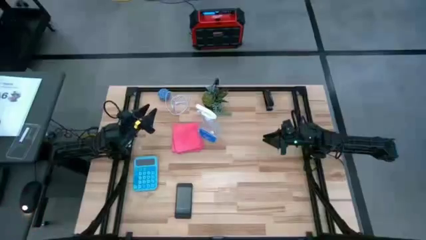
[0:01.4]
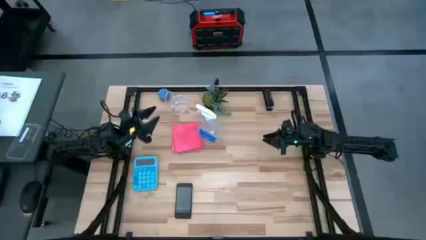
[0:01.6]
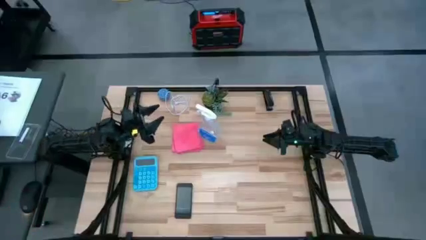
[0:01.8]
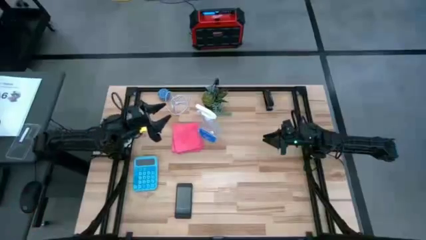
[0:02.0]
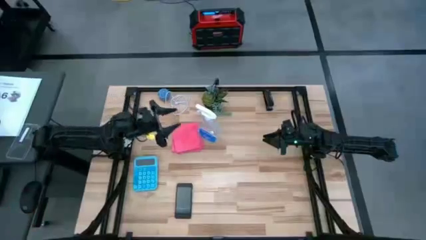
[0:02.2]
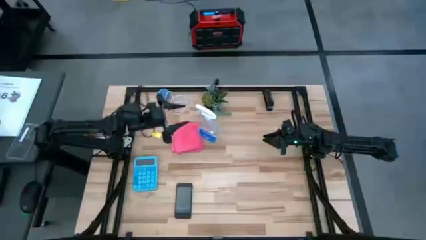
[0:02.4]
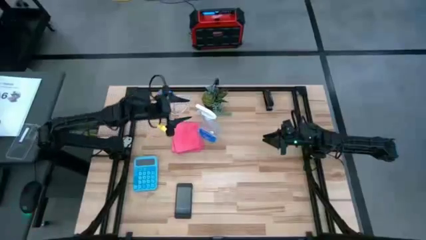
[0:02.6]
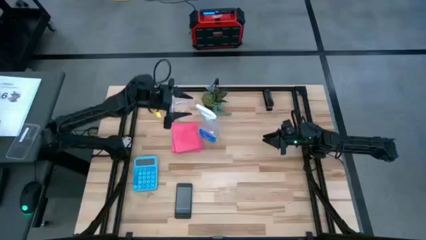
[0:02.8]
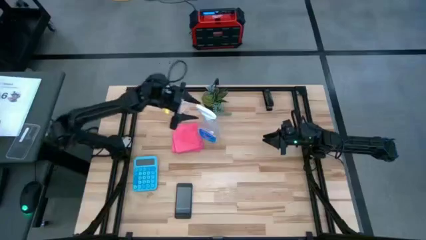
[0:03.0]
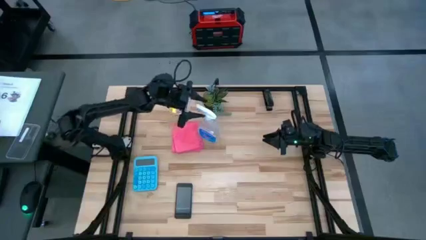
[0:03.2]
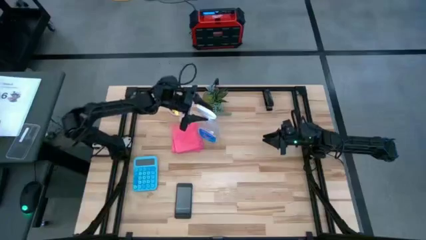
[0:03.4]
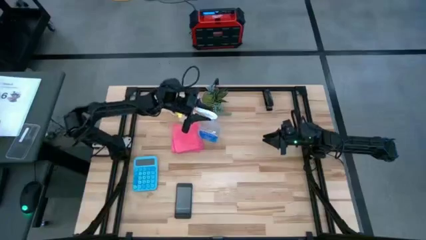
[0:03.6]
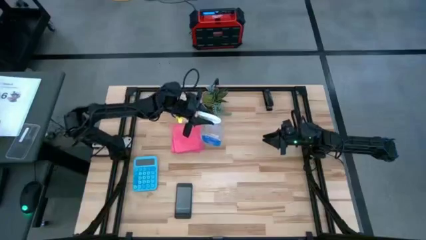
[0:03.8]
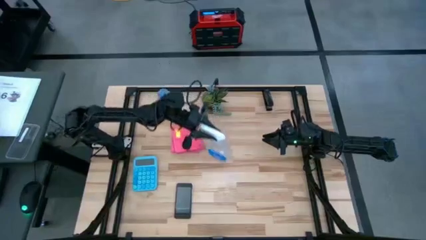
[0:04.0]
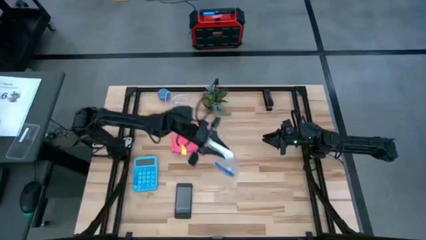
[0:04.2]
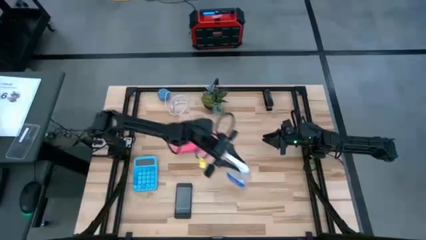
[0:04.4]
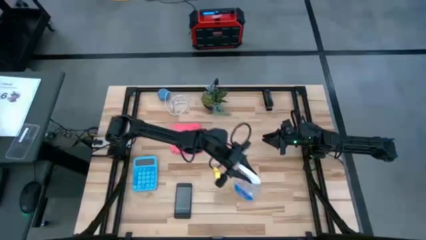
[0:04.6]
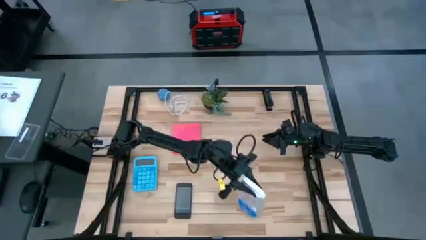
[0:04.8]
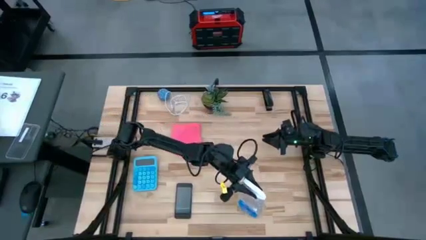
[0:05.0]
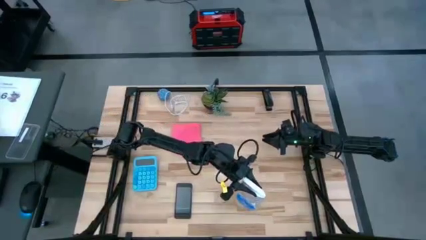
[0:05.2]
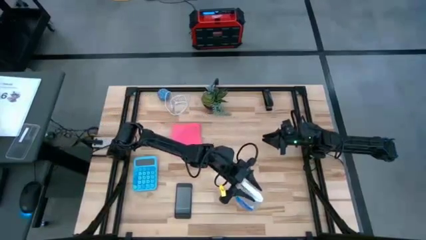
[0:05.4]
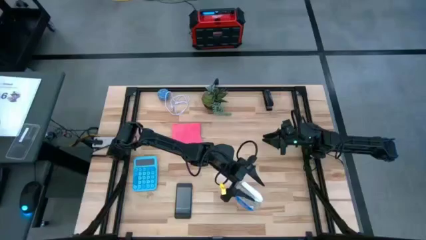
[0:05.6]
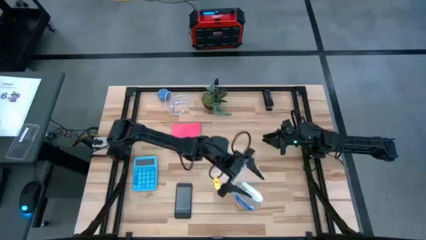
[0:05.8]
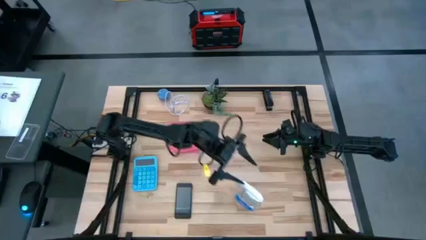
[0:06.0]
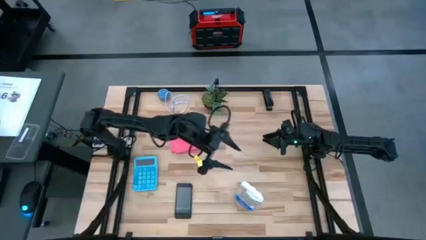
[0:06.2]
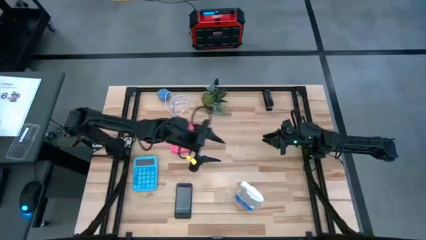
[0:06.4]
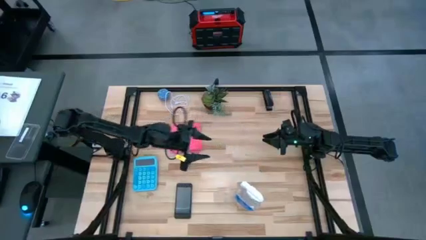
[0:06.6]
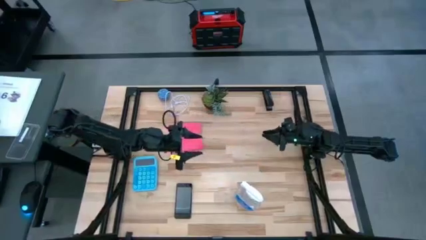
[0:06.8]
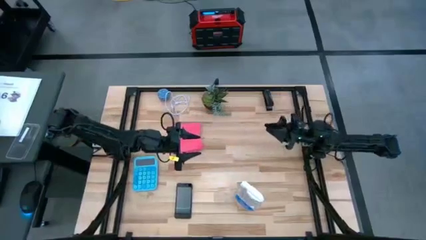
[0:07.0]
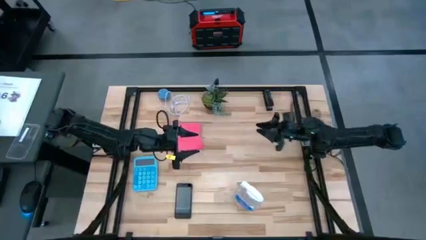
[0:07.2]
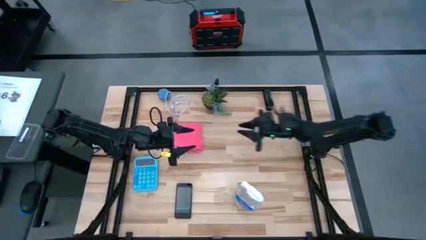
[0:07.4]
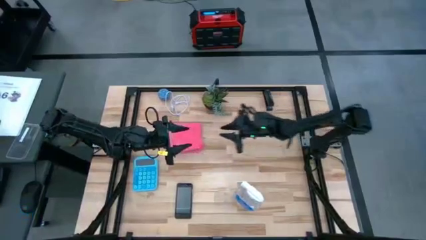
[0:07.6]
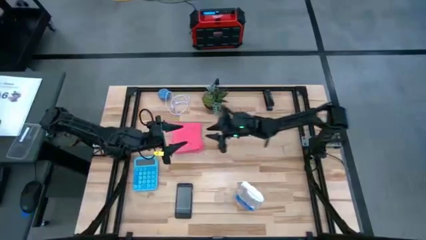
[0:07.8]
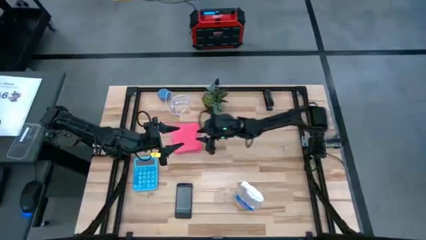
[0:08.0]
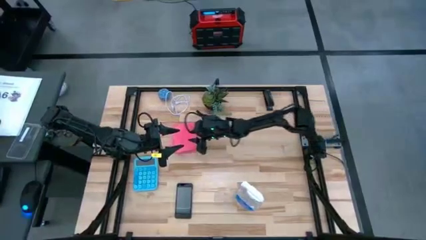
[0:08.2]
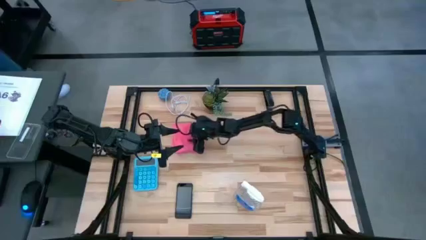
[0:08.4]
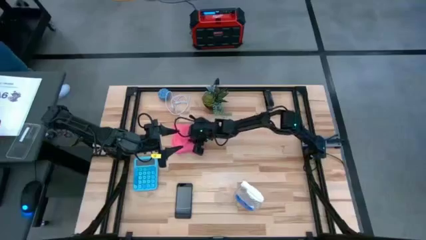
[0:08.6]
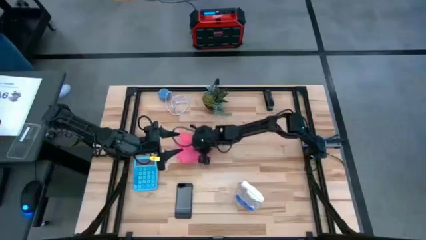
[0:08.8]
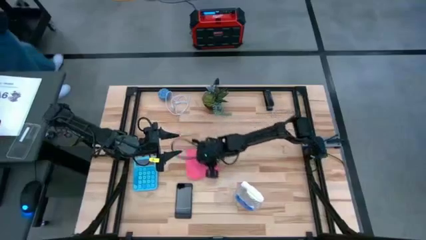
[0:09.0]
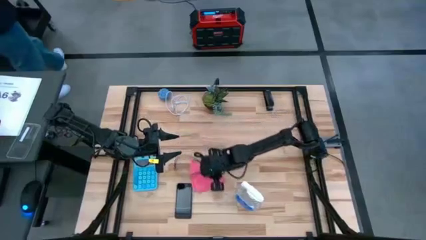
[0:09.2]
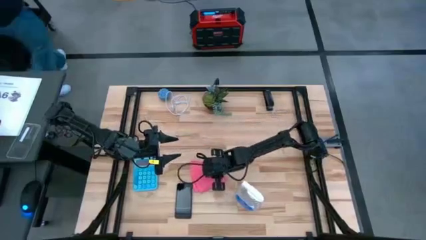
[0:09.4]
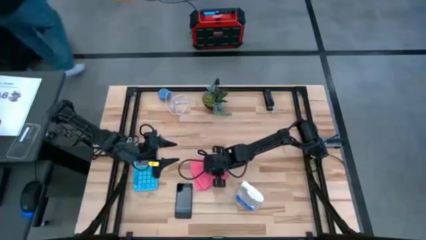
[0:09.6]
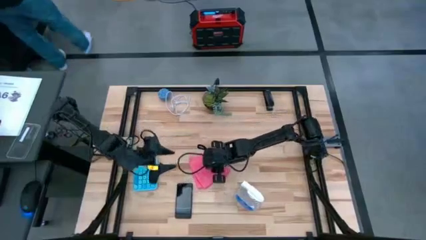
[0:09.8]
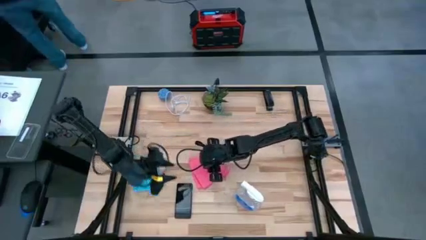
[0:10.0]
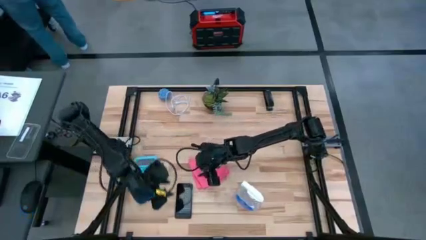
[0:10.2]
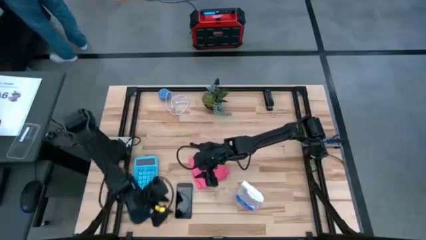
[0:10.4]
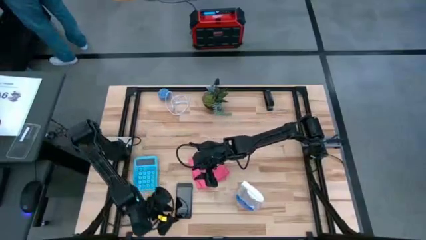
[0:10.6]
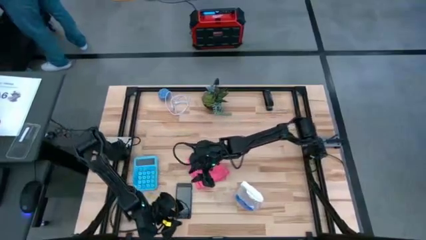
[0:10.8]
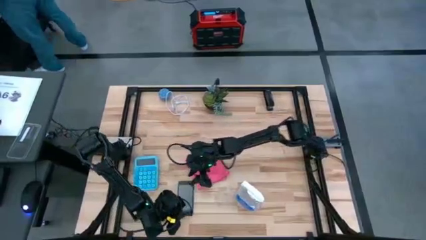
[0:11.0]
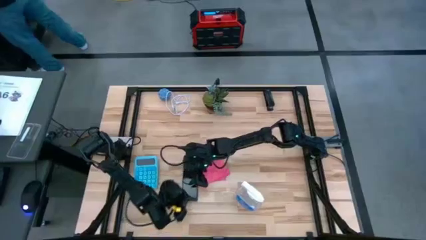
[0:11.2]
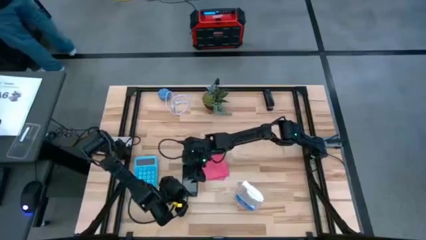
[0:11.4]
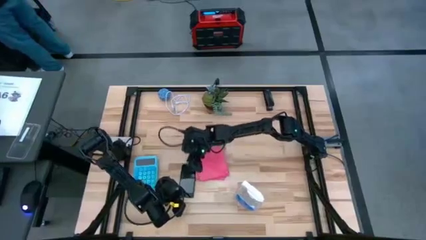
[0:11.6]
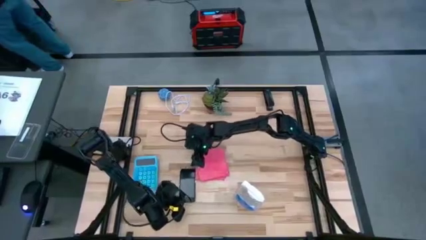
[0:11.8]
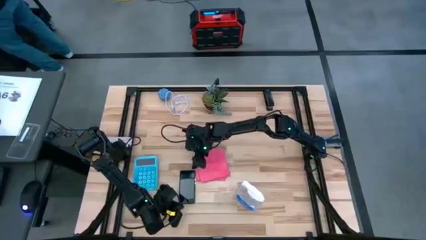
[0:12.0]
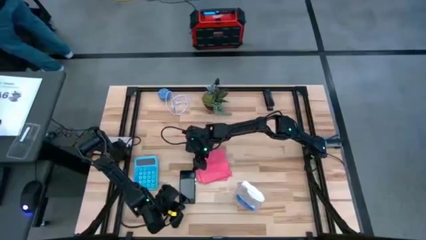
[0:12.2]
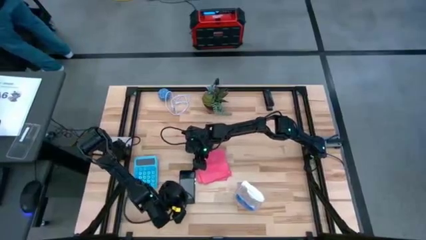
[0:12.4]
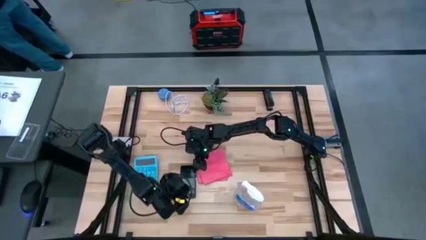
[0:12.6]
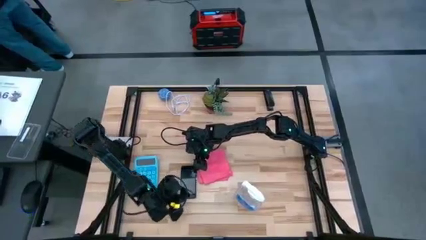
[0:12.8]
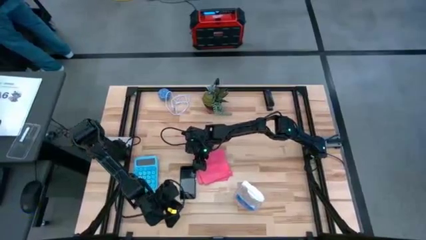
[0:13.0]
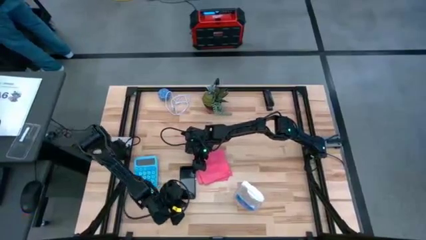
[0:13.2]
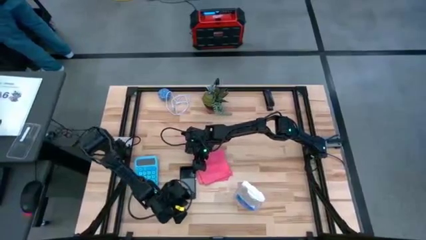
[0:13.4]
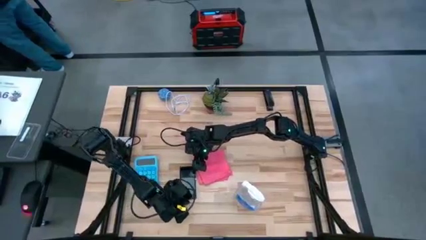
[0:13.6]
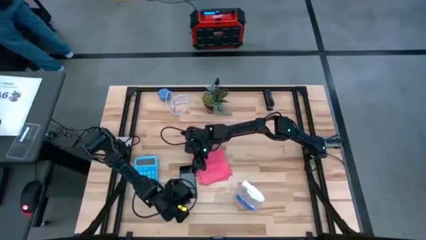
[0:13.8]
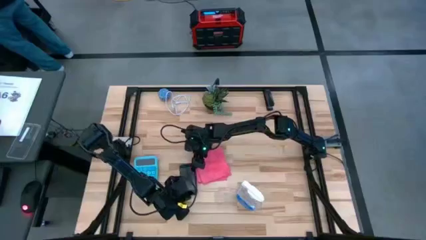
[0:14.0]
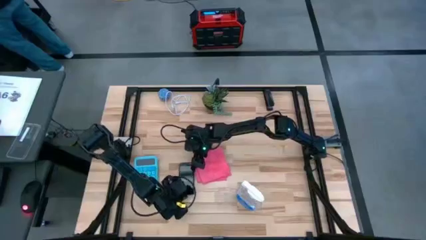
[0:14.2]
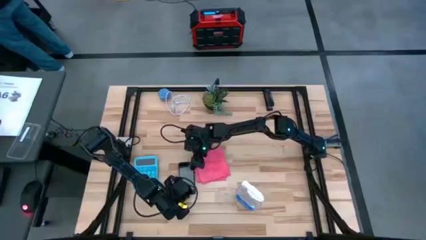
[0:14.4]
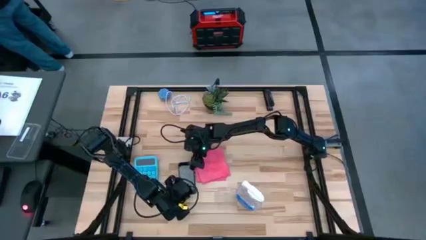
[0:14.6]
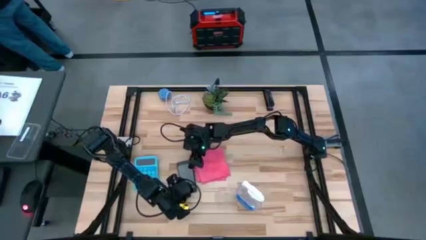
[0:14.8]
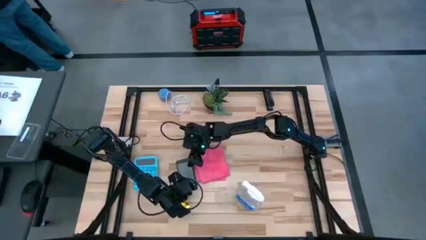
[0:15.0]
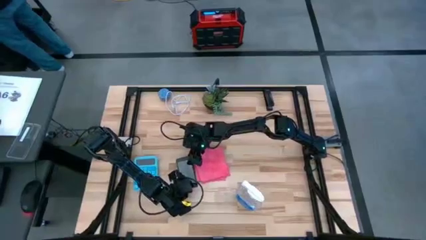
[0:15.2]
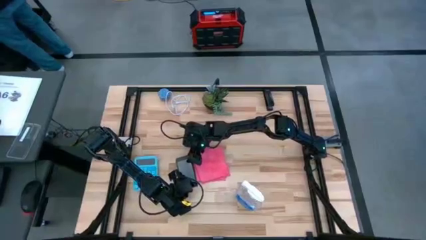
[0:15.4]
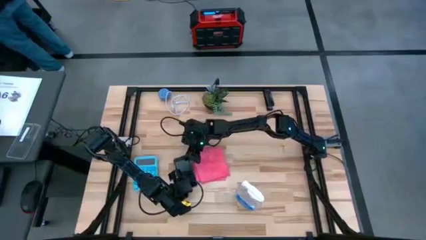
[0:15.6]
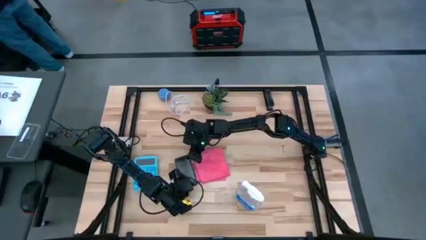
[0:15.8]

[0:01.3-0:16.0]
Task: Apply microfiber cloth
Spray the front of the cellphone using the spray bottle
